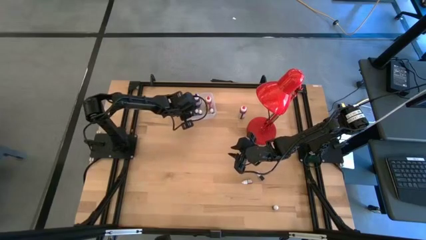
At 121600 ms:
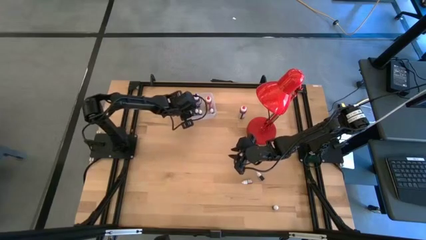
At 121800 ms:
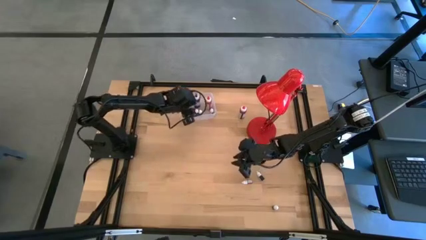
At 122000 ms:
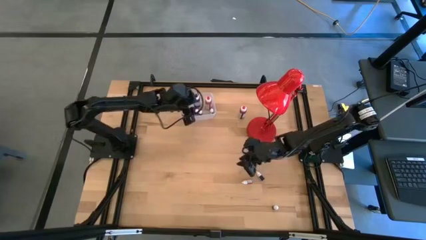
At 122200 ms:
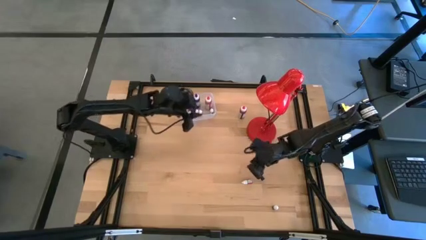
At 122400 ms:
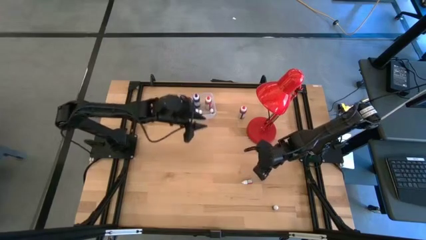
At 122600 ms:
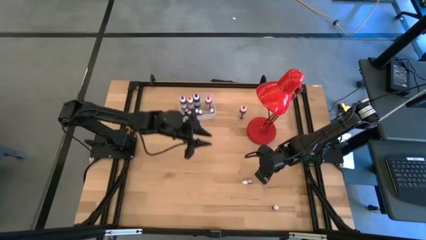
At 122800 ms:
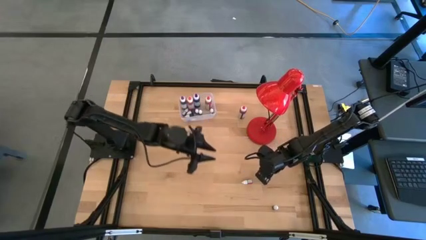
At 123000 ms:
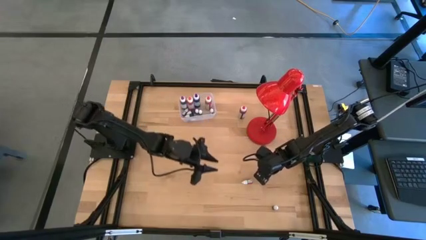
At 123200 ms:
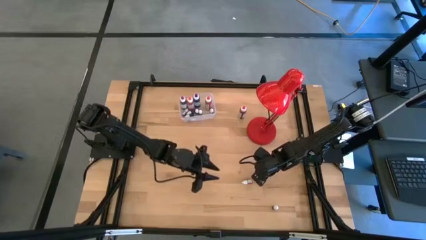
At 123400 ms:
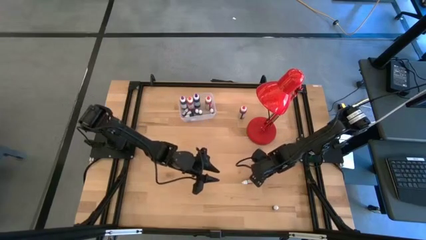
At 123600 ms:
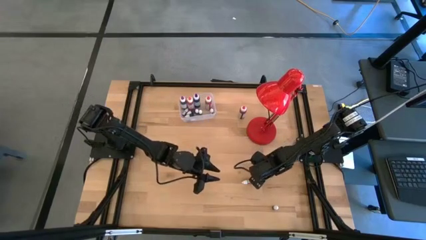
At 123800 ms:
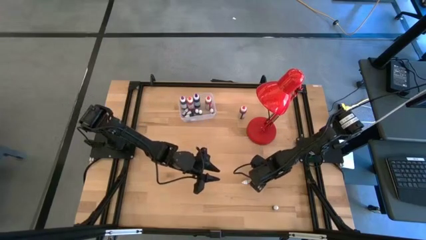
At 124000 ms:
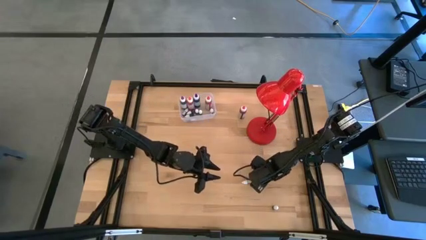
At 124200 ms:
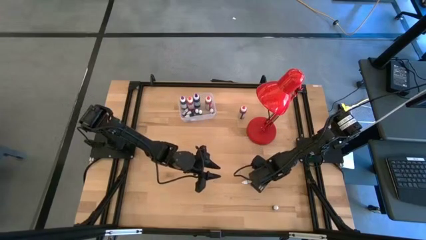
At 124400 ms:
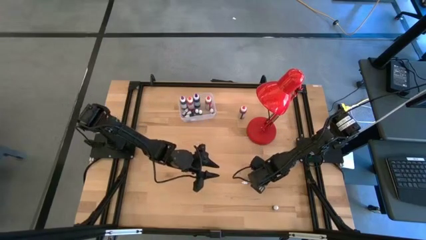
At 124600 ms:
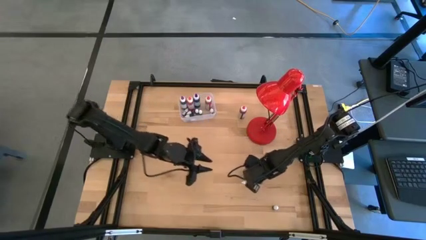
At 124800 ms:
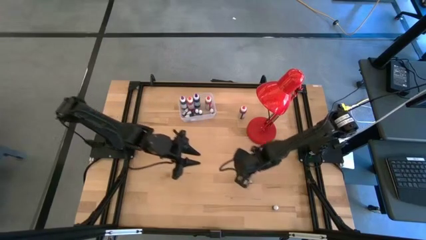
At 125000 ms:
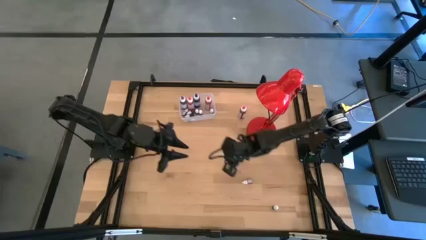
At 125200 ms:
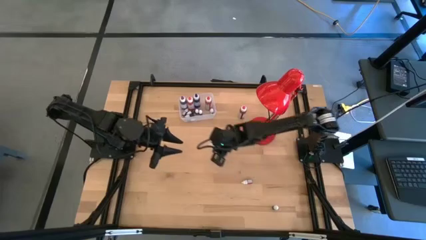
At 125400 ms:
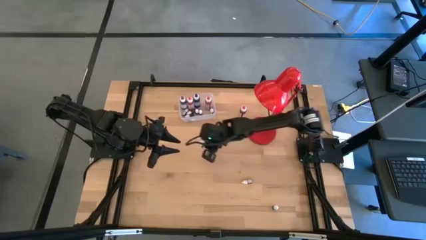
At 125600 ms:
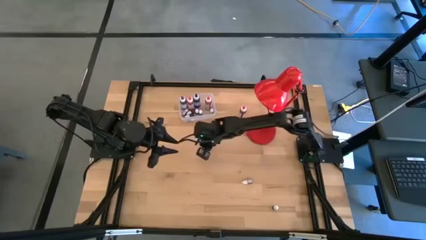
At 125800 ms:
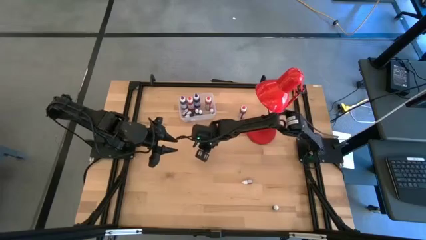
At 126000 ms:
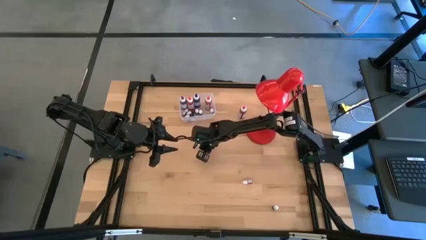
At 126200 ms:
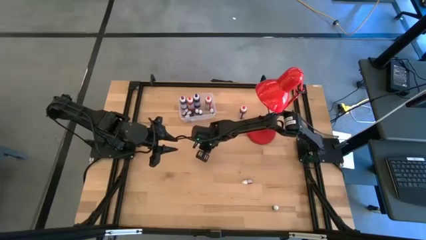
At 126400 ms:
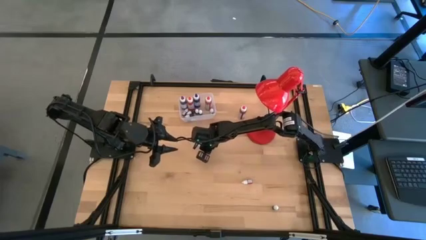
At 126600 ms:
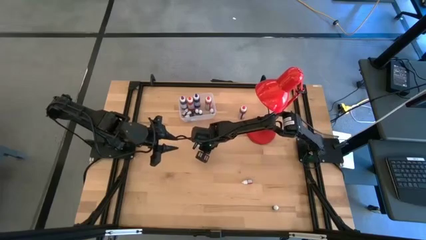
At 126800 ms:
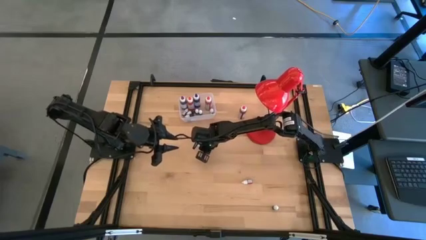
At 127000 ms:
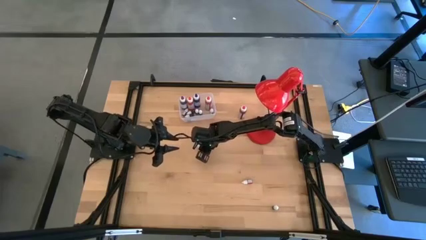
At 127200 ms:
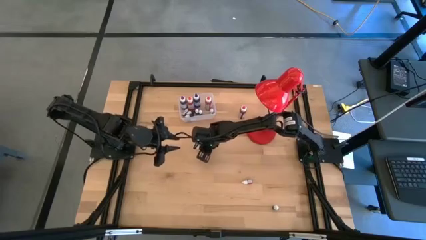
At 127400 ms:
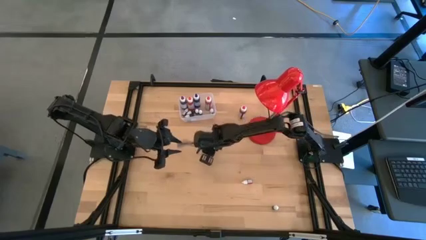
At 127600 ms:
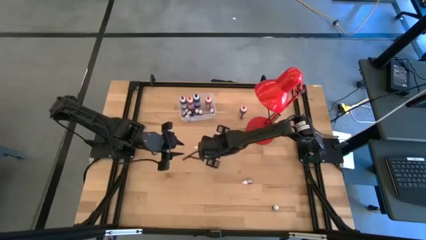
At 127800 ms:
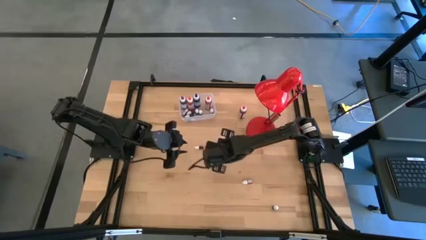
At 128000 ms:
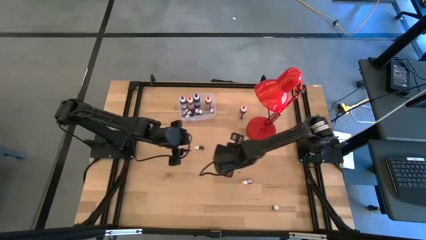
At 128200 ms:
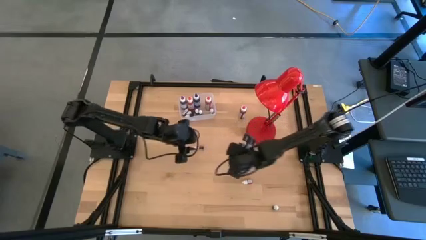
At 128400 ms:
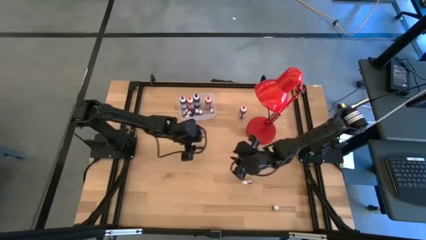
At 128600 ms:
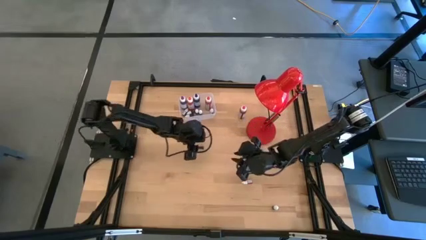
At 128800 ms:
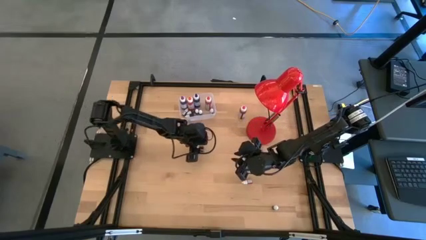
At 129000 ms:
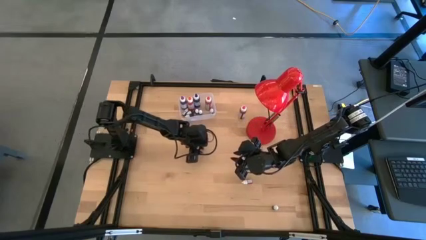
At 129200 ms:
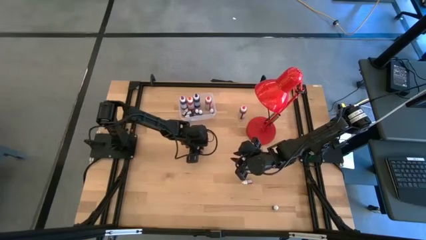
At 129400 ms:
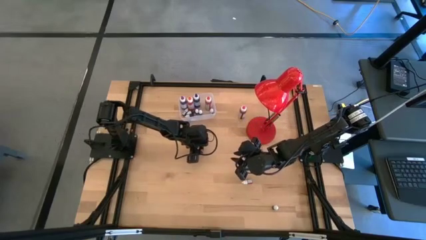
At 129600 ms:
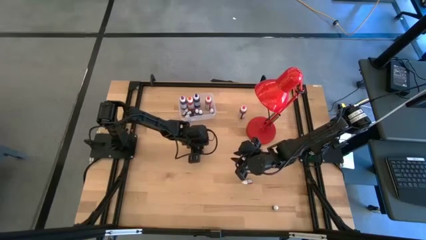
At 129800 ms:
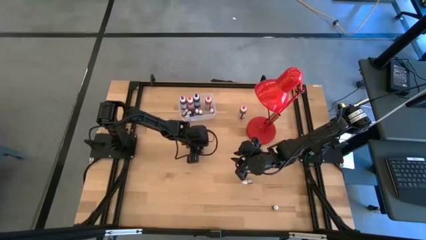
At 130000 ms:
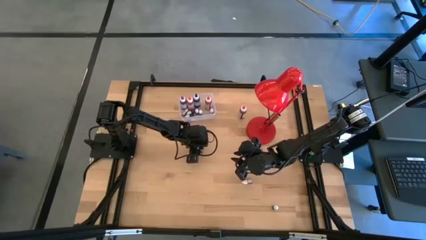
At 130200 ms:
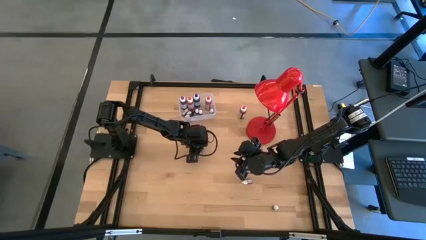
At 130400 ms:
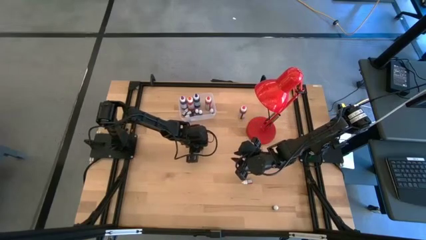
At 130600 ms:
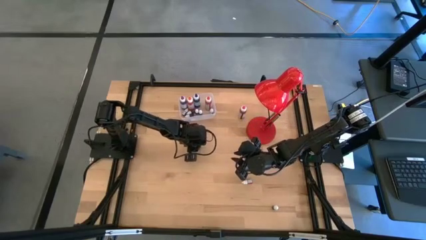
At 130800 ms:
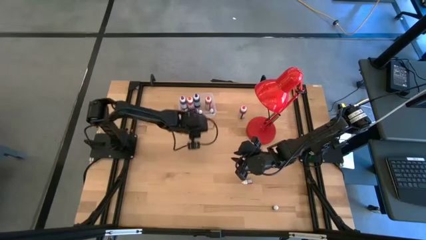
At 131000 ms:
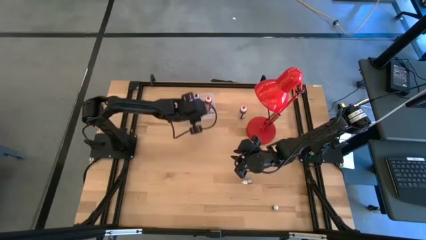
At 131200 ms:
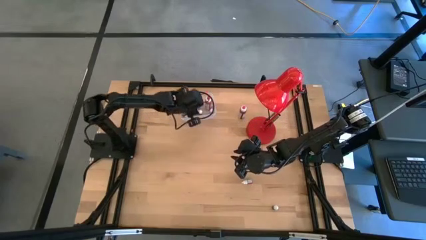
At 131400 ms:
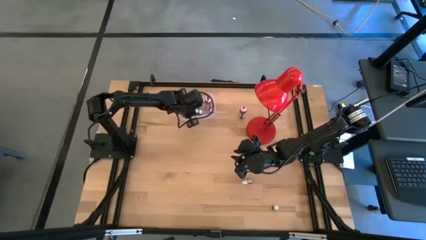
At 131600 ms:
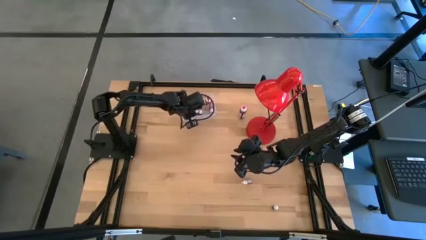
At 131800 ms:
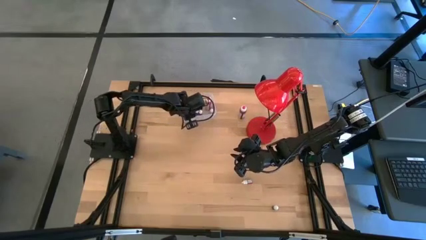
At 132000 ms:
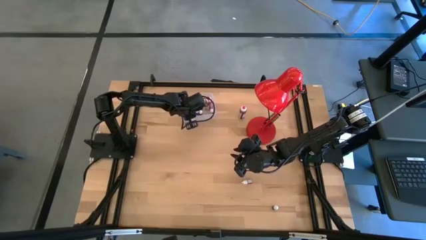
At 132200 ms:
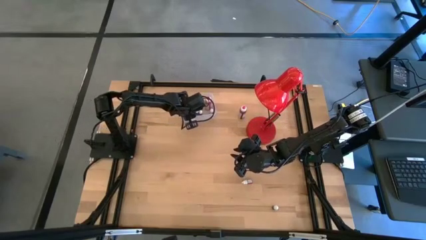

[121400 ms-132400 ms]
Task: Pick & Place food coloring
Put the small brown food coloring bottle into the transparent bin

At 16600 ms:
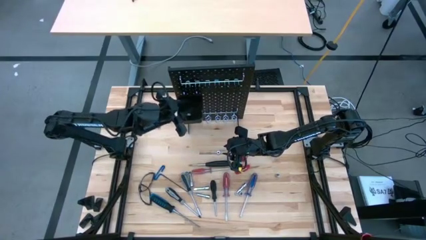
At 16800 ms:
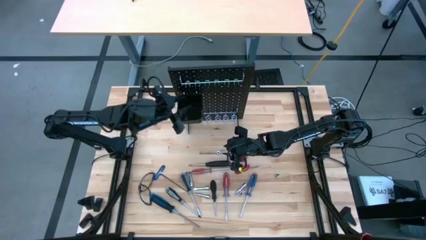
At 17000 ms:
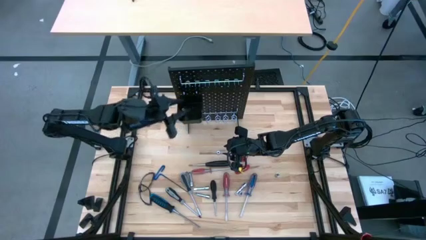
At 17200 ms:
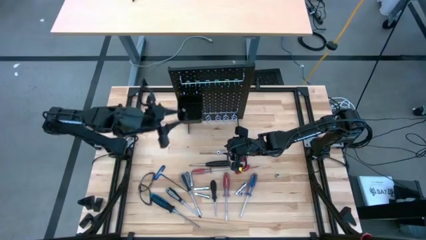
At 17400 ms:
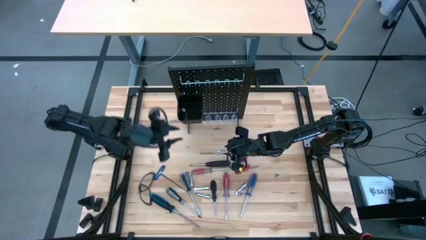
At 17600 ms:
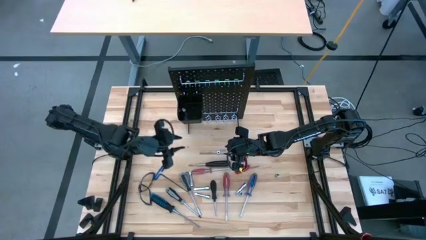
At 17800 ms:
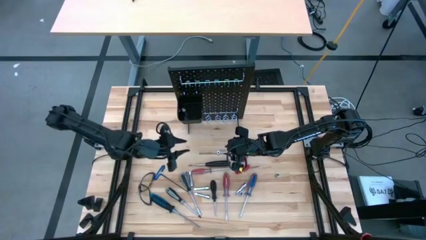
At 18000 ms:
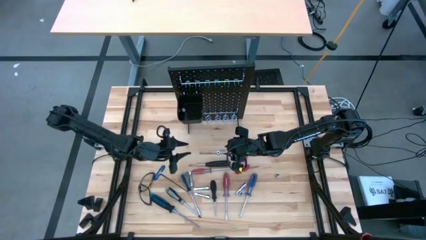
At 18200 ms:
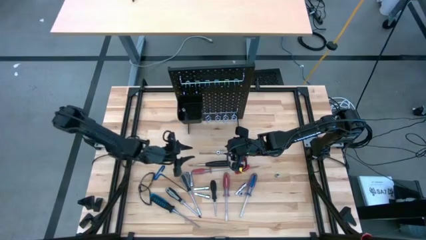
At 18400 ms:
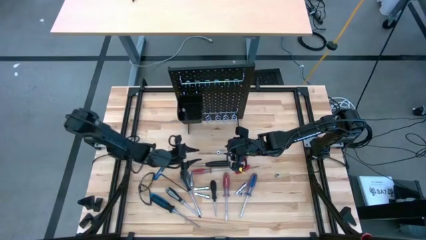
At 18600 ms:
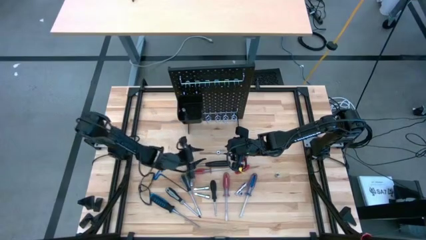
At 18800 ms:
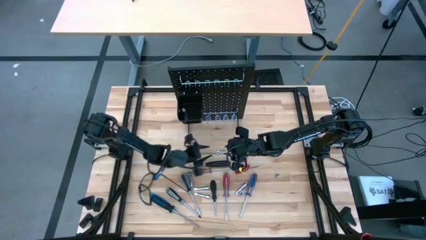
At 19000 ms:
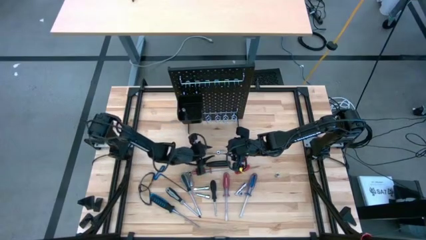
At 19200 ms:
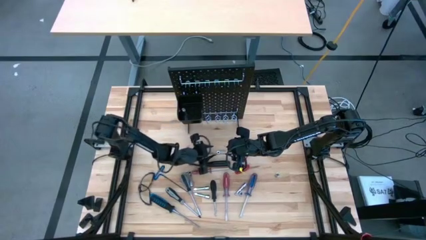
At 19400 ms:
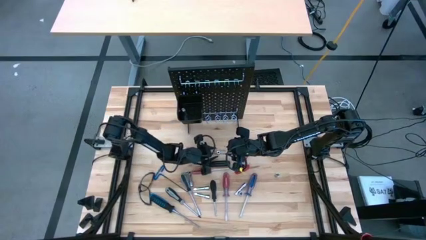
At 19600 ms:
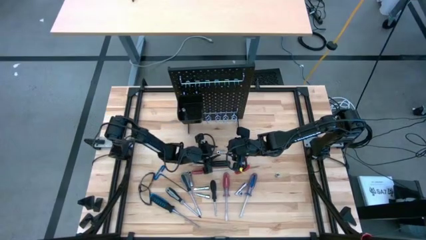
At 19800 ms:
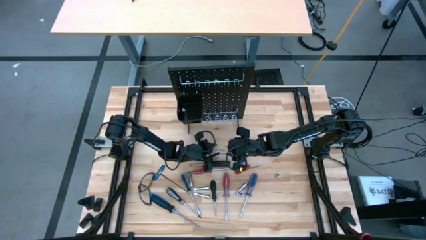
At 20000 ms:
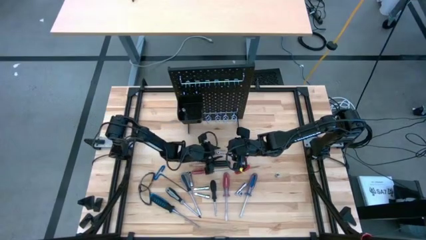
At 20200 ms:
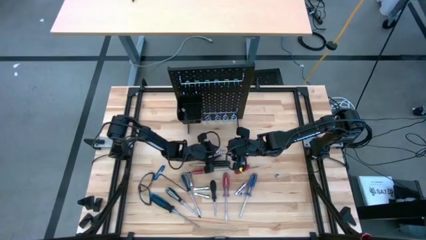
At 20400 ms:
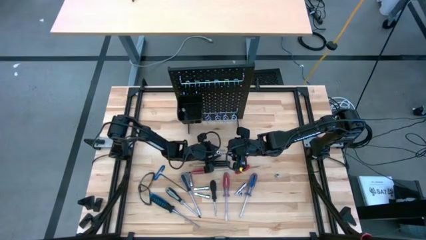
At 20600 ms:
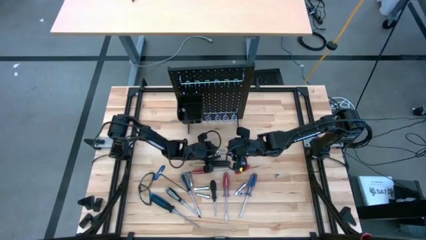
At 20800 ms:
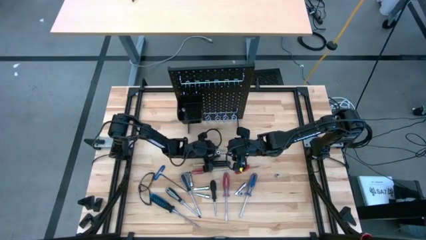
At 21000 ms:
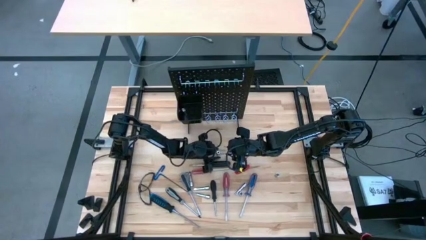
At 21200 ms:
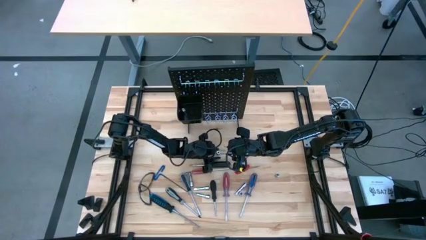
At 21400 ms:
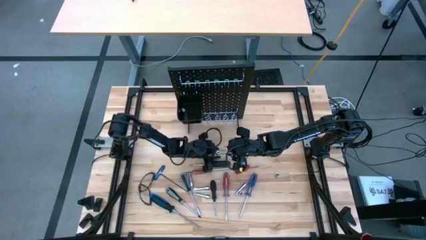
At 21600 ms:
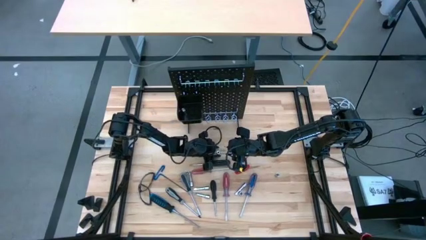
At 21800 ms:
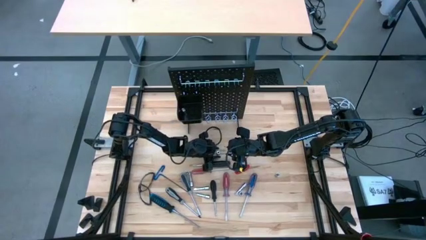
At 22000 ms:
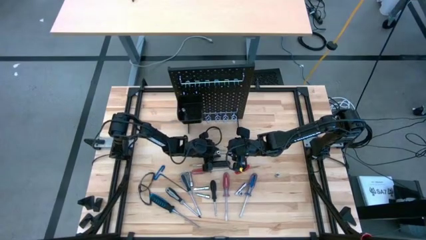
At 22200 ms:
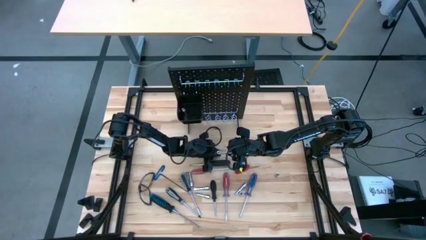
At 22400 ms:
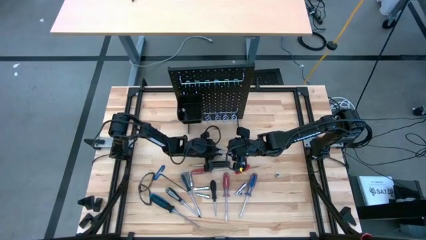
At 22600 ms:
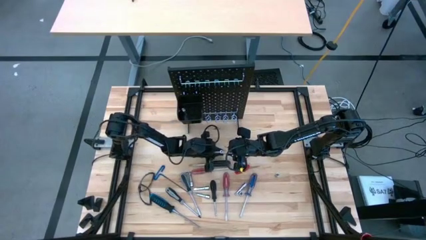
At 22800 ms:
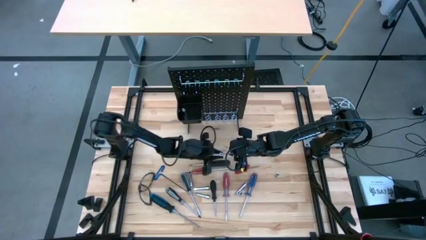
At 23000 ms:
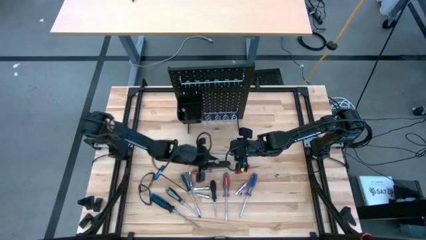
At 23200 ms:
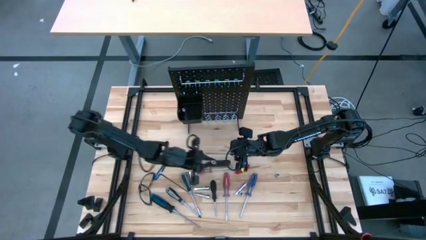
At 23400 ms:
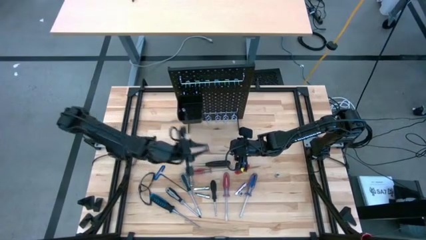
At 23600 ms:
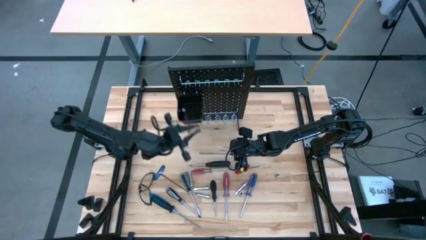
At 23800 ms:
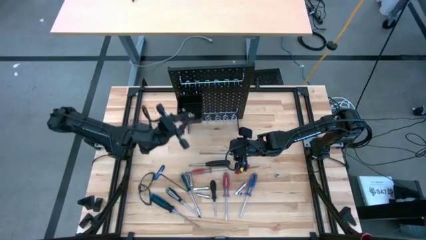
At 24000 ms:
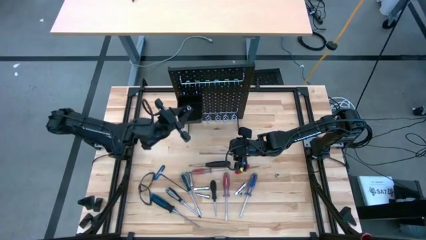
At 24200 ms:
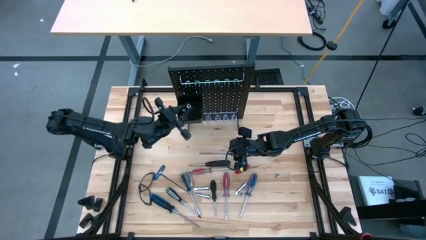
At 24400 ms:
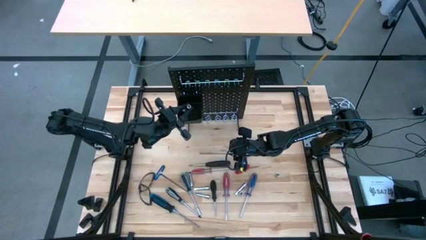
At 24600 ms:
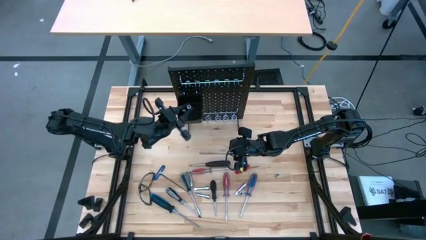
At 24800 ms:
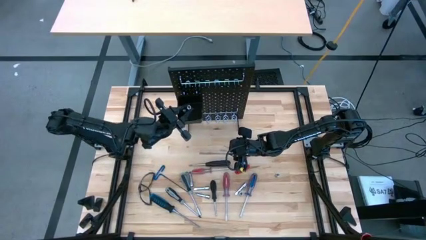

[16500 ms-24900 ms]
Task: Hang tools onto peg board
Put the socket into the black bin on the pegboard
